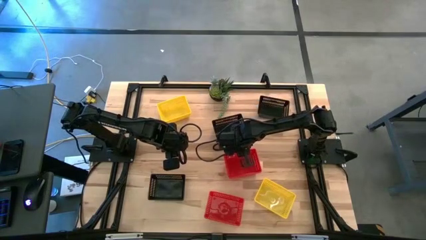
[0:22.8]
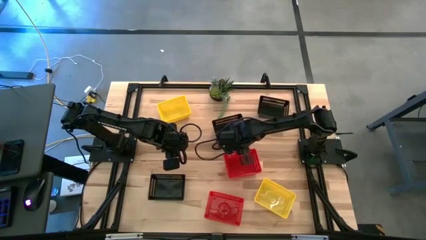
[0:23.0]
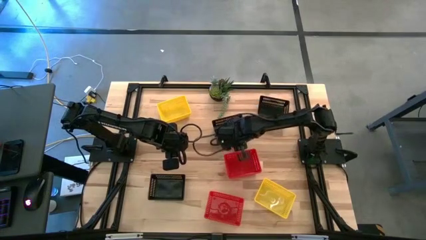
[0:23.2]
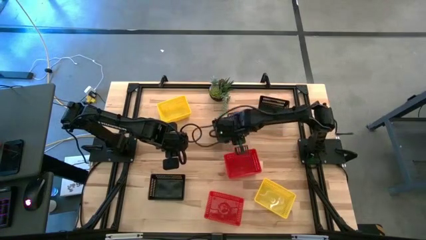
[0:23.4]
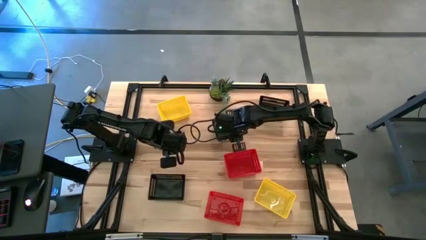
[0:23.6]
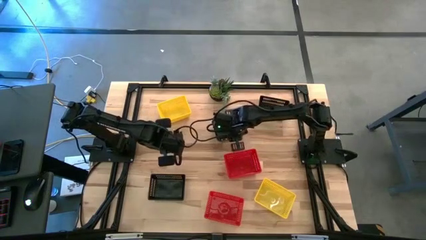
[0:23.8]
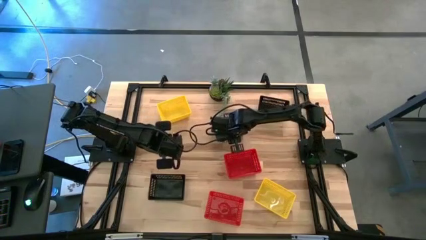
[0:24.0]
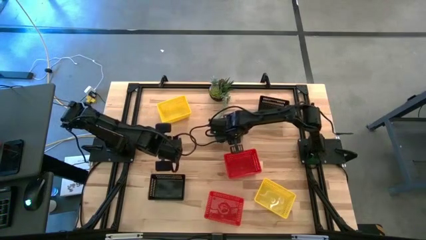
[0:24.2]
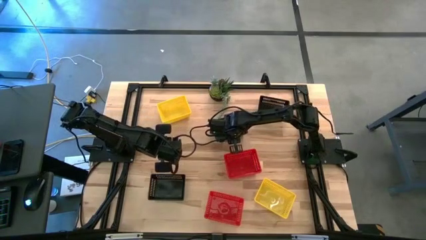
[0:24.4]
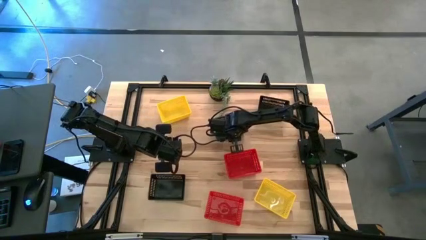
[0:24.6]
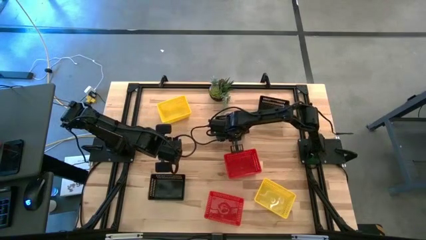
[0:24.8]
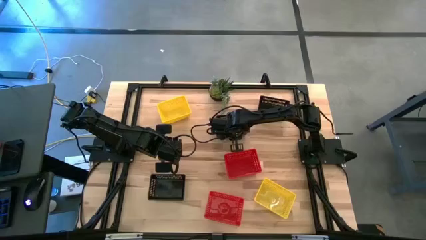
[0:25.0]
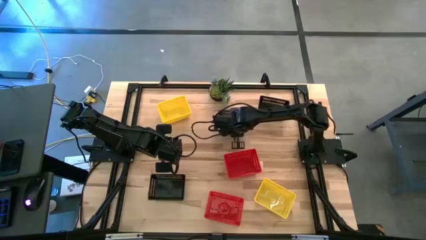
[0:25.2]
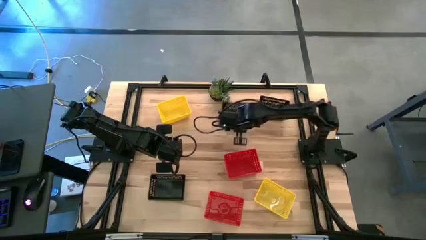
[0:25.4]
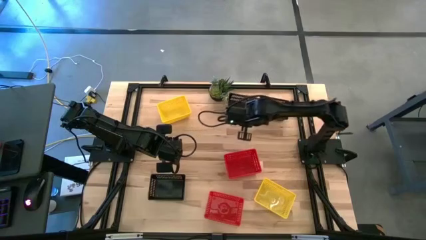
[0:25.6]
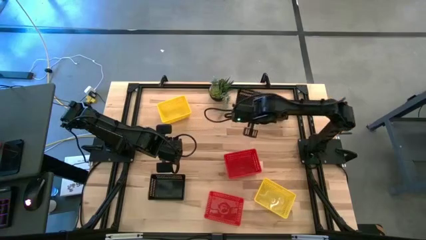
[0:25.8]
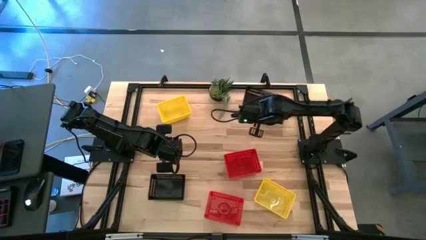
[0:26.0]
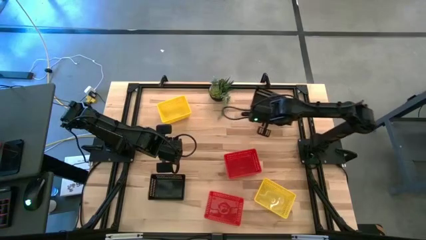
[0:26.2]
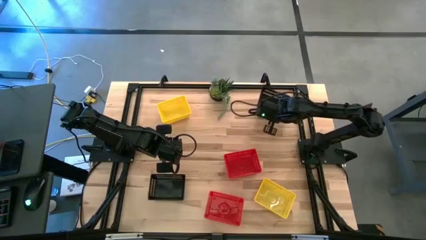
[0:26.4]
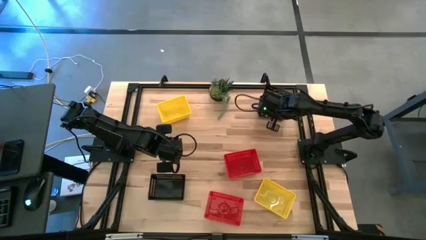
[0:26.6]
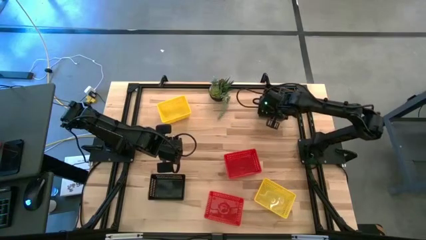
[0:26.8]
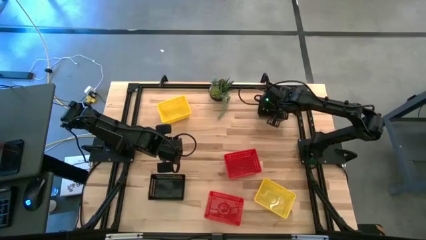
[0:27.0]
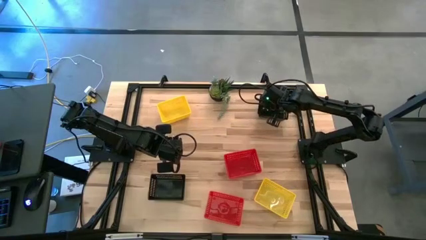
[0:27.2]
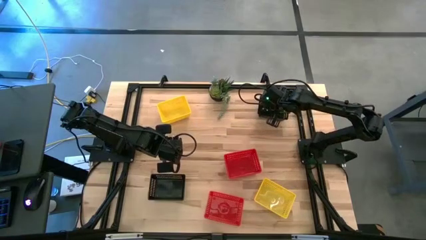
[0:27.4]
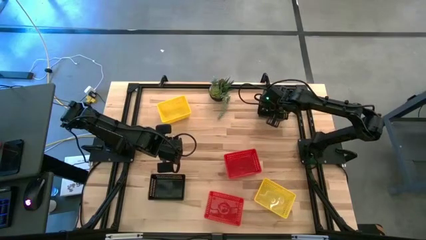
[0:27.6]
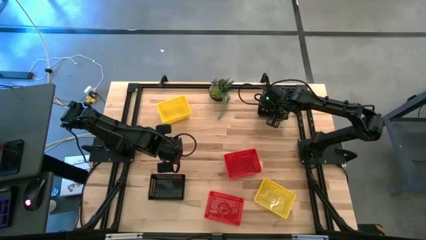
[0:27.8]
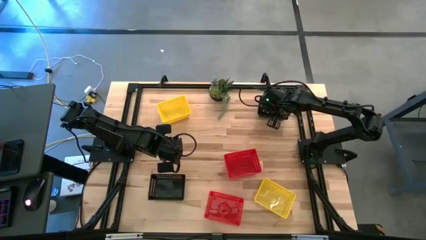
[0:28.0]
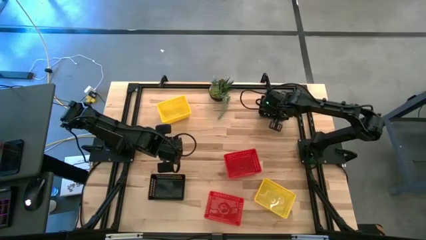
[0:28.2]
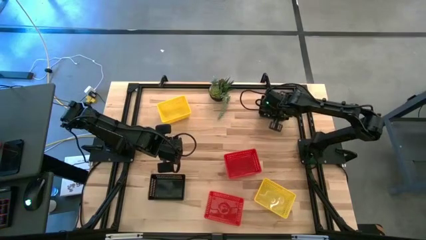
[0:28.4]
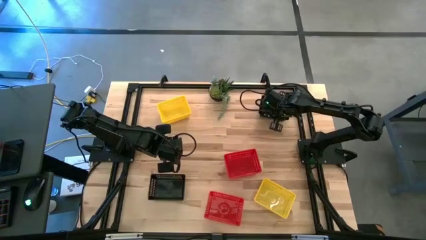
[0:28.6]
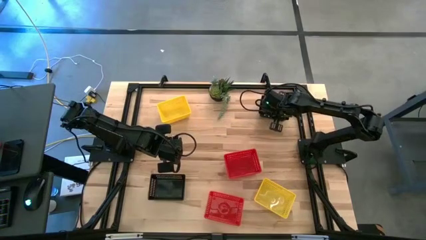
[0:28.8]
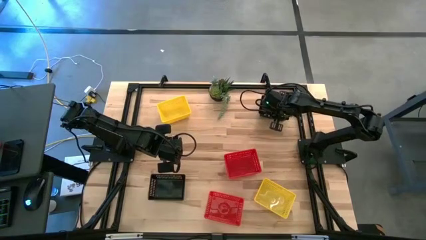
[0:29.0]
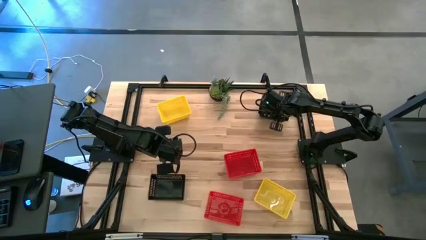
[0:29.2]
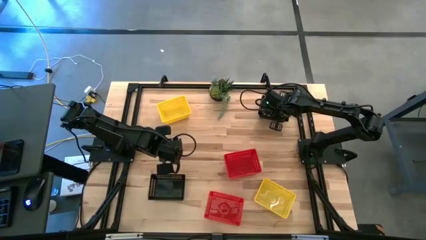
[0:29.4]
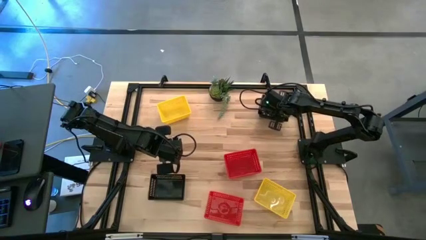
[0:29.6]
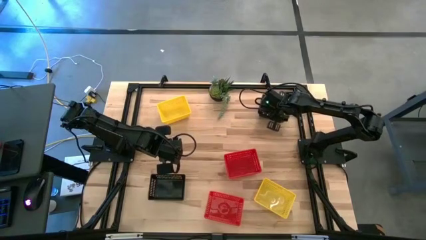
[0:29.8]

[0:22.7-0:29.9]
Stack the middle black bin on top of the top black bin on the table

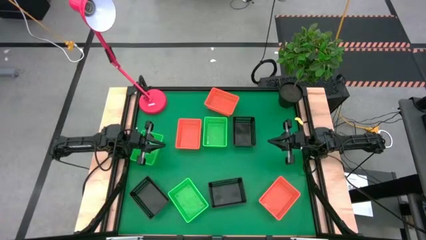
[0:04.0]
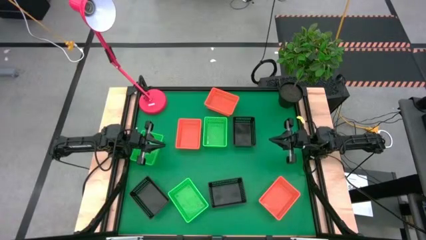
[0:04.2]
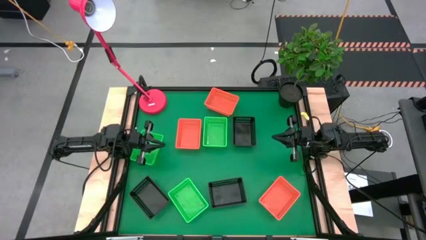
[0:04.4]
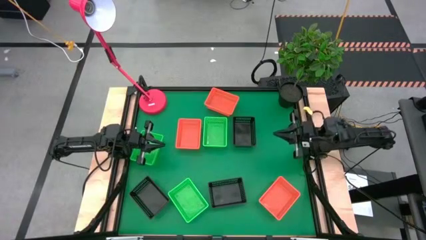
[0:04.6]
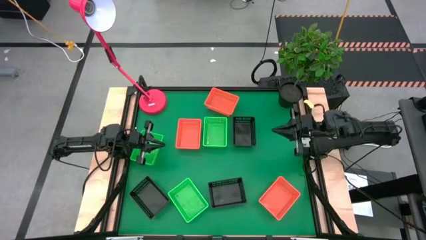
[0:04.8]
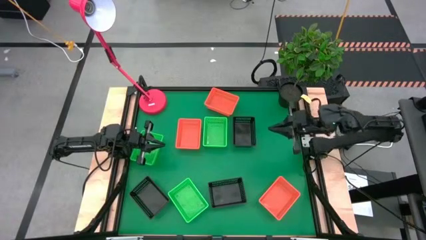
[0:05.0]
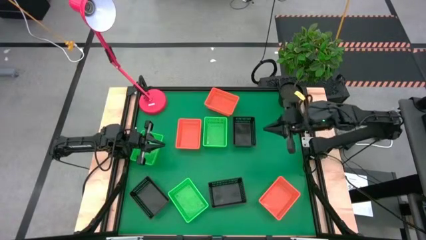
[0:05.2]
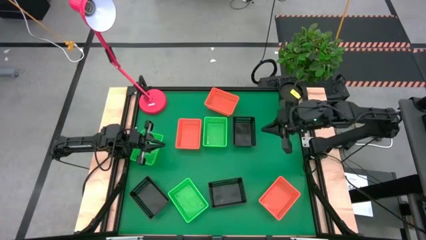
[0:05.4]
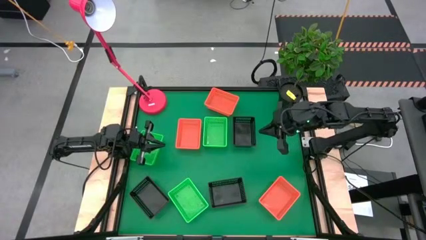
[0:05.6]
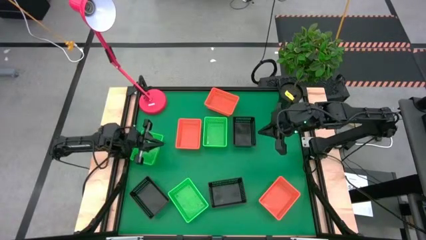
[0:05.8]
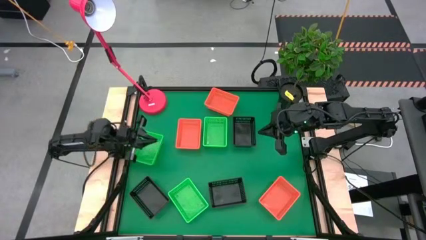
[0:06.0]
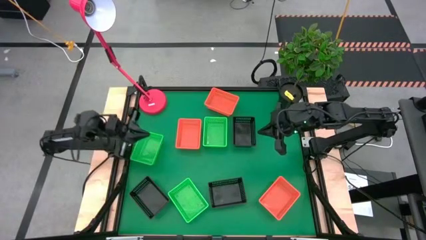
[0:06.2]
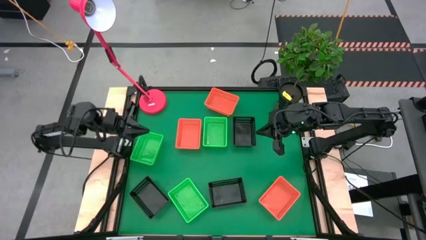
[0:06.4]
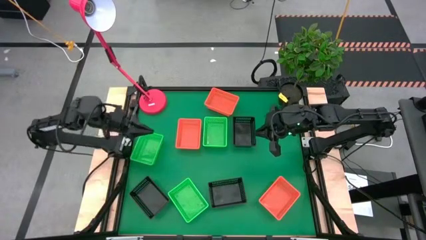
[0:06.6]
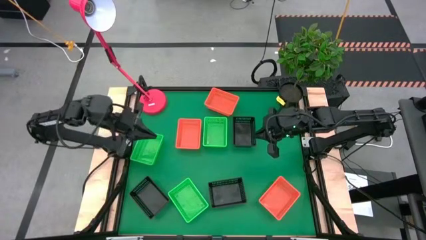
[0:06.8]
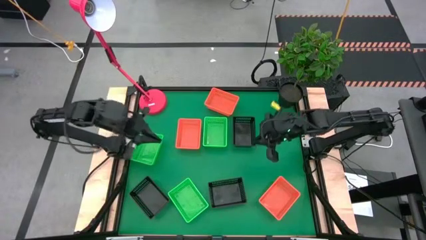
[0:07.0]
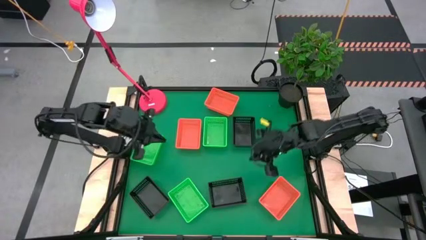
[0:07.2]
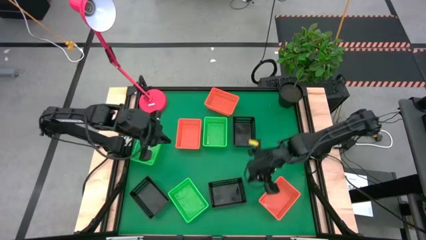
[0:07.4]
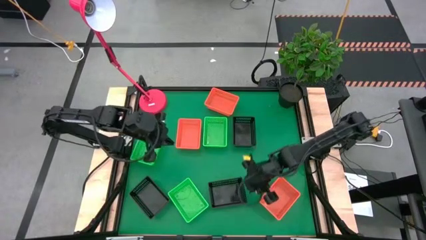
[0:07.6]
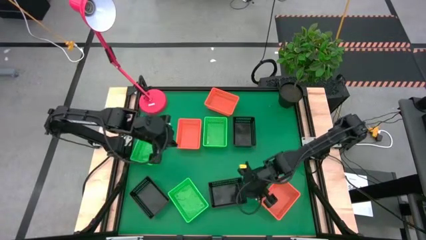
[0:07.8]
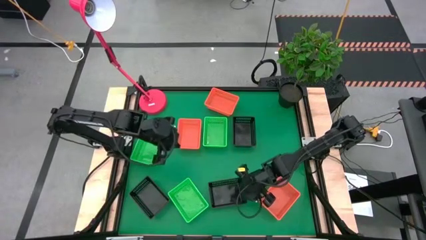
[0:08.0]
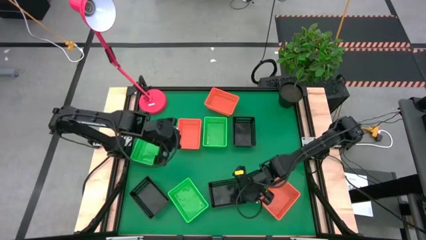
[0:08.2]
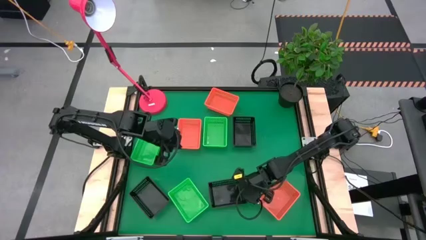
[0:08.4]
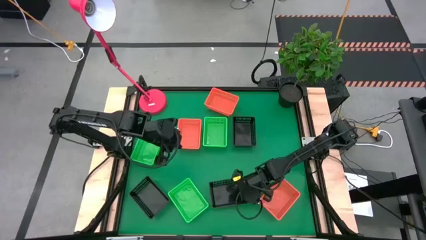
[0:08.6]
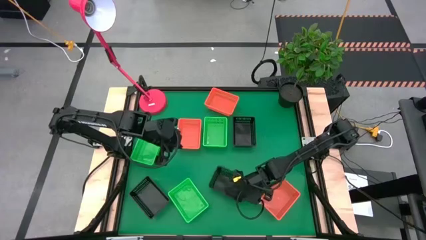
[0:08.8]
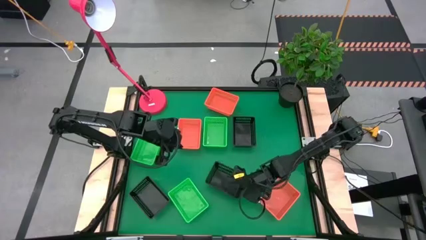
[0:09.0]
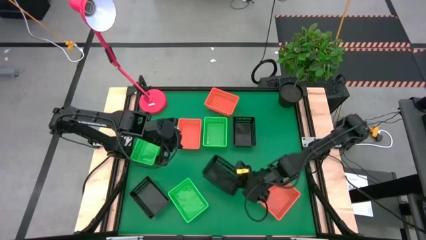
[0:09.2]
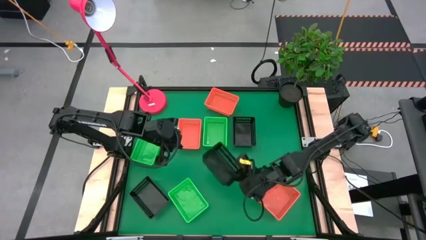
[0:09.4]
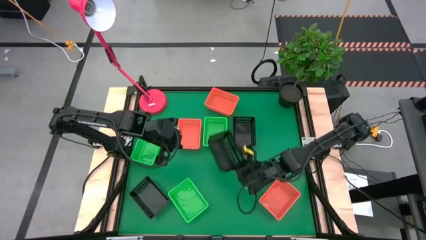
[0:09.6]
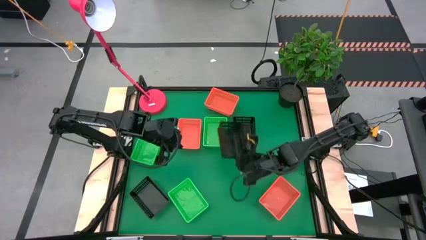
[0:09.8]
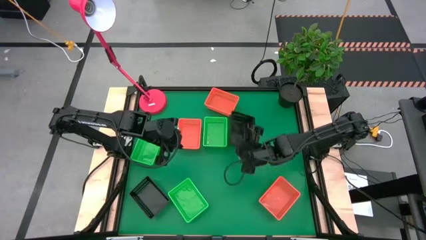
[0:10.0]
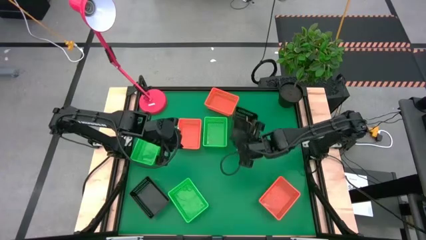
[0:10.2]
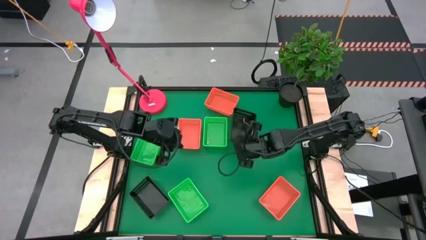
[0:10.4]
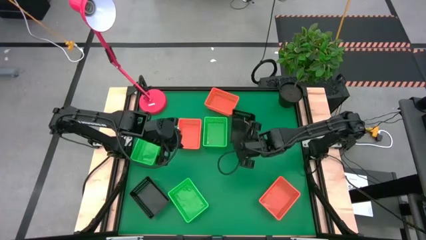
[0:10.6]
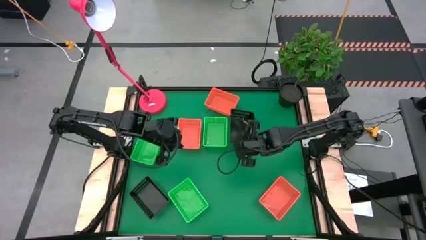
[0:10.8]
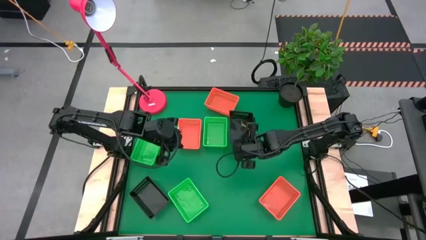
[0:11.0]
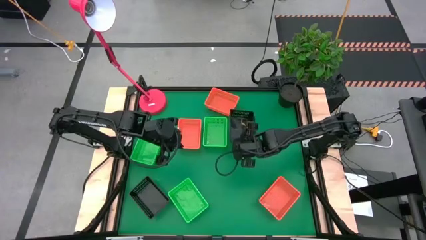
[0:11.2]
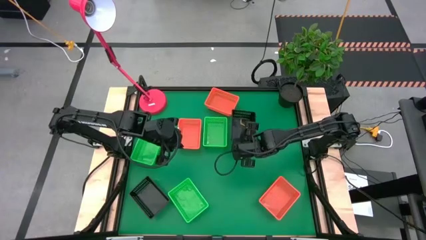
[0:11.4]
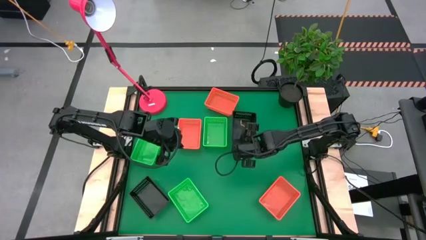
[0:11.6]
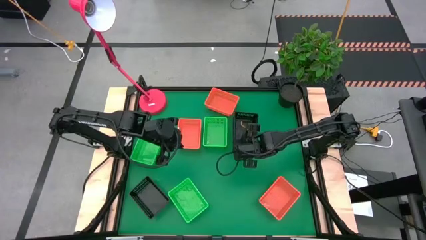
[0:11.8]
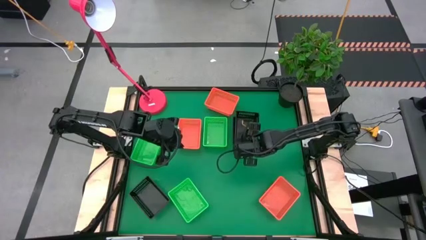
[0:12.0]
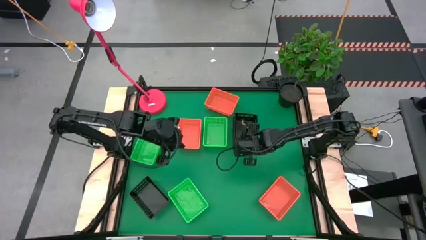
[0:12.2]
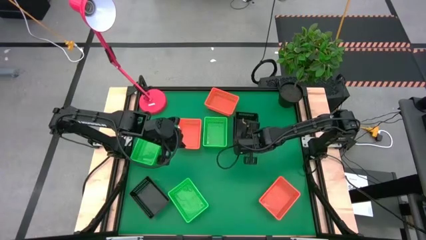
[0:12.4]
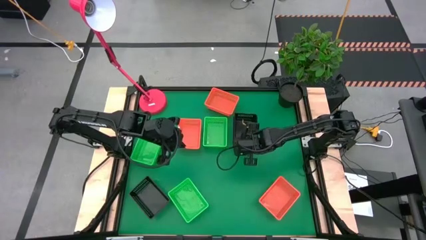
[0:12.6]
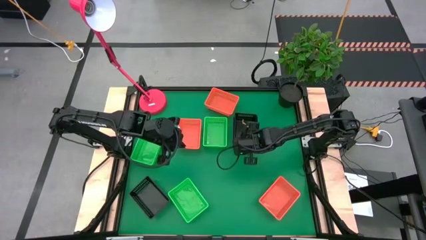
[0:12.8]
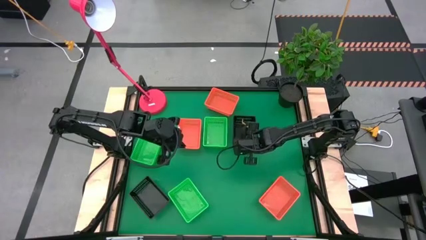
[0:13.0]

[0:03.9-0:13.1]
Stack the bottom right black basket on top of the other top black basket
